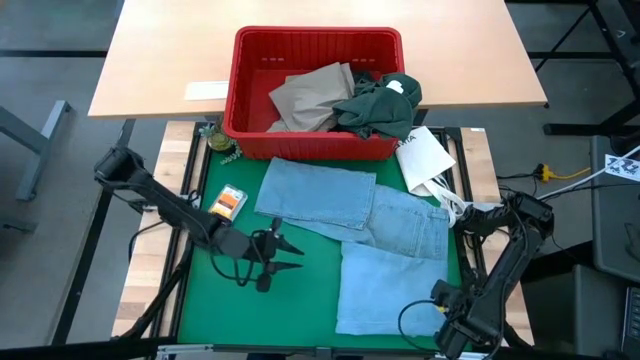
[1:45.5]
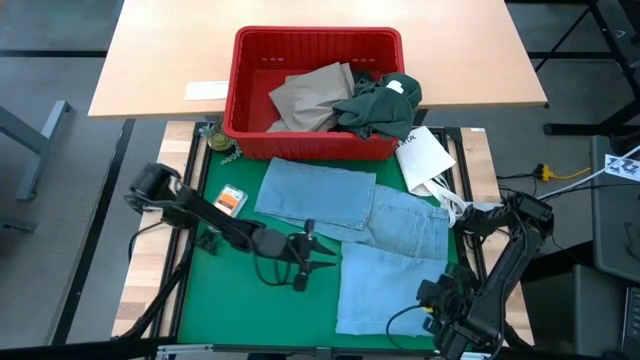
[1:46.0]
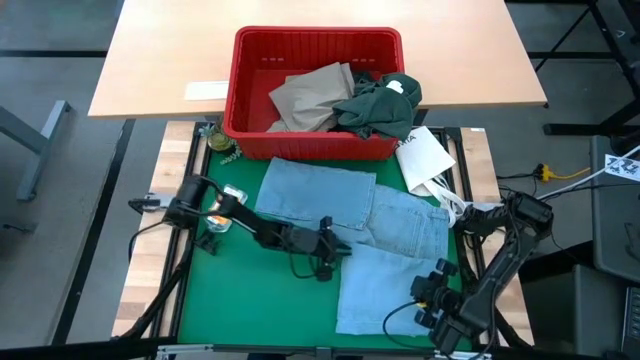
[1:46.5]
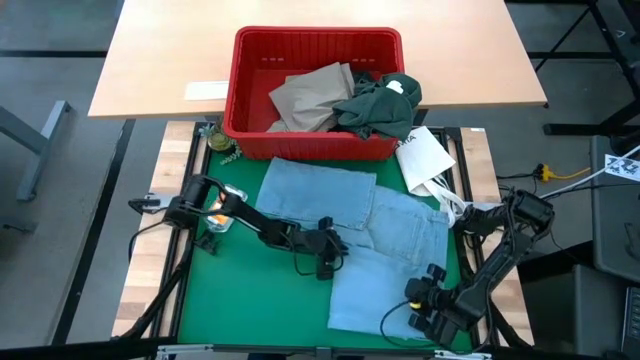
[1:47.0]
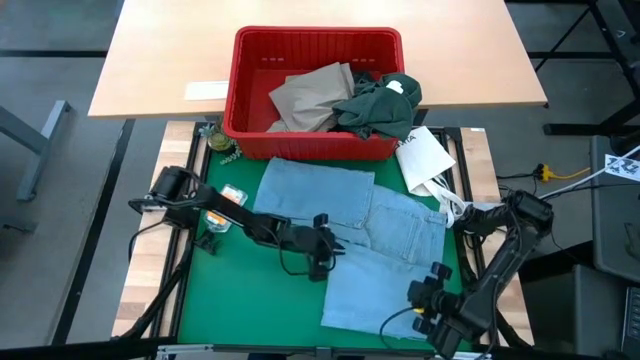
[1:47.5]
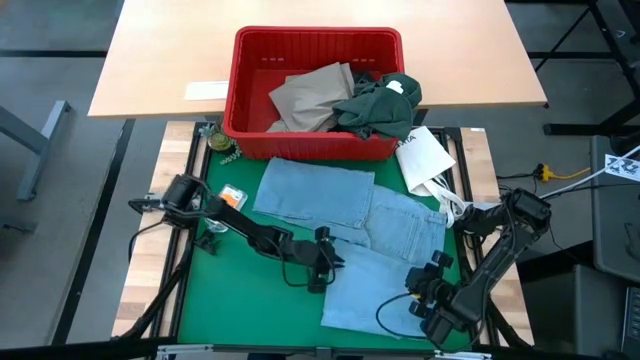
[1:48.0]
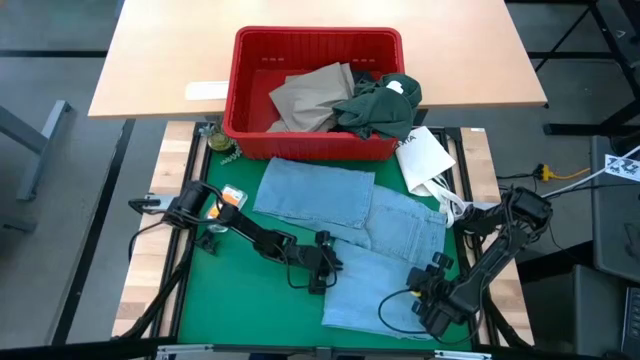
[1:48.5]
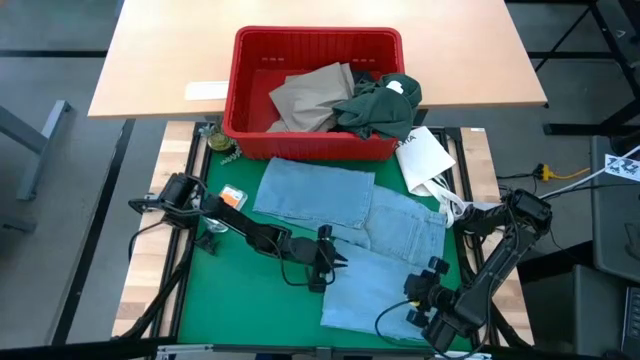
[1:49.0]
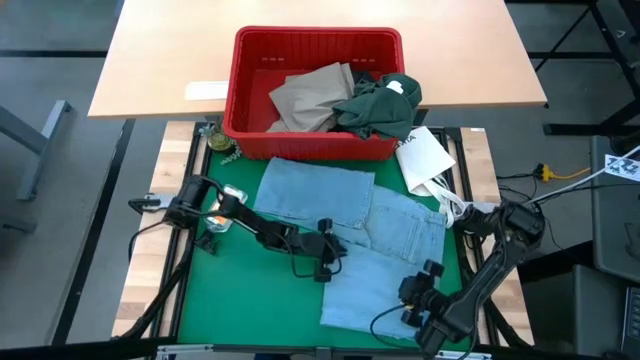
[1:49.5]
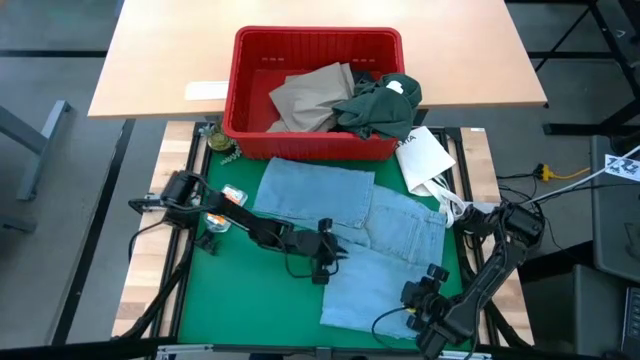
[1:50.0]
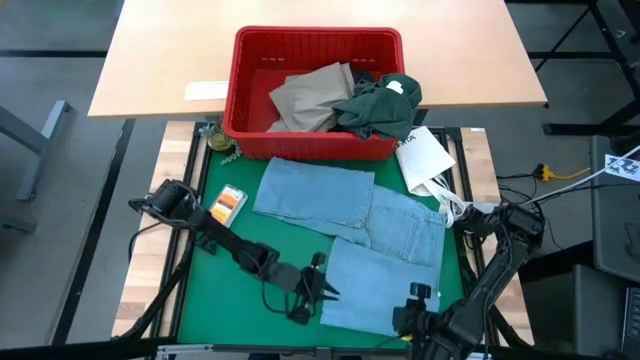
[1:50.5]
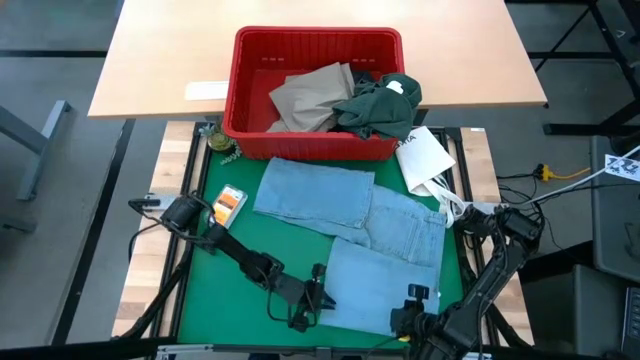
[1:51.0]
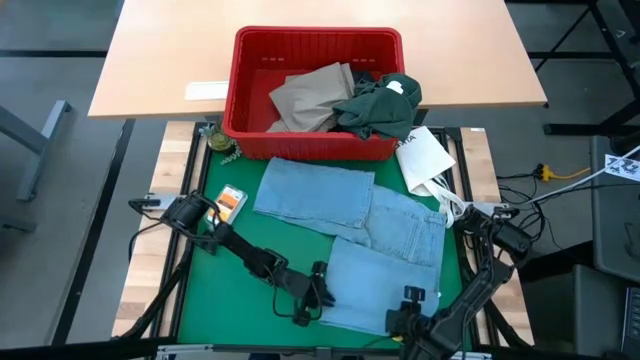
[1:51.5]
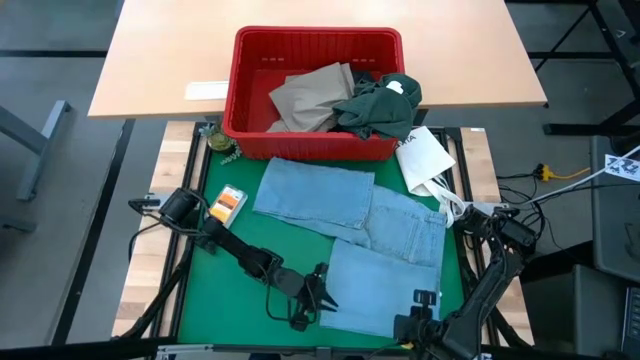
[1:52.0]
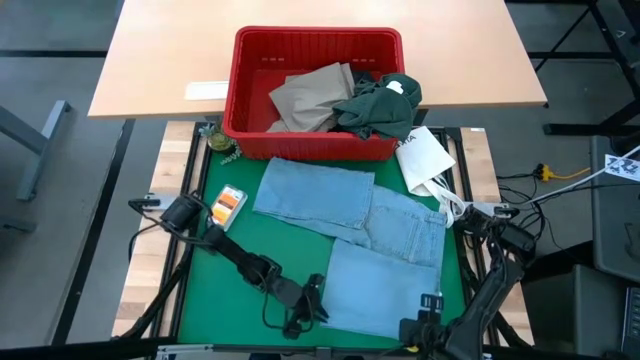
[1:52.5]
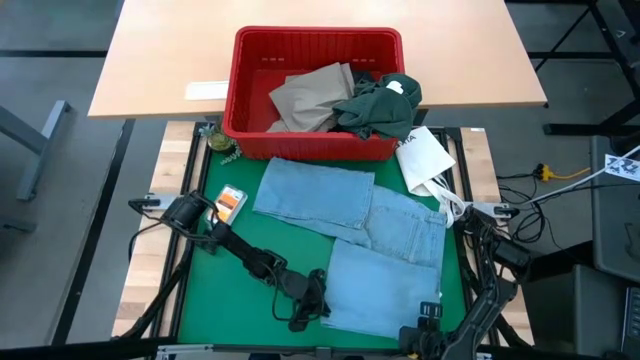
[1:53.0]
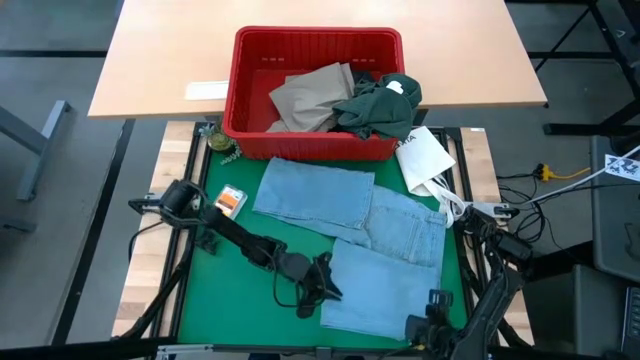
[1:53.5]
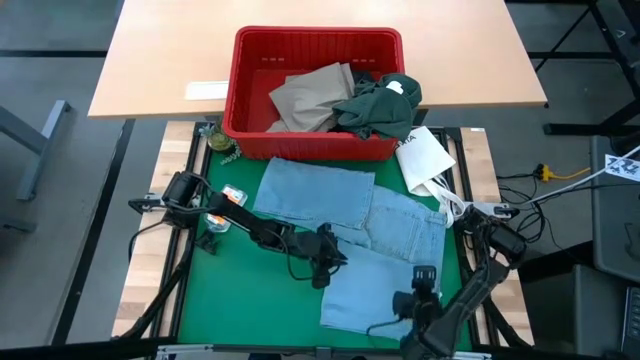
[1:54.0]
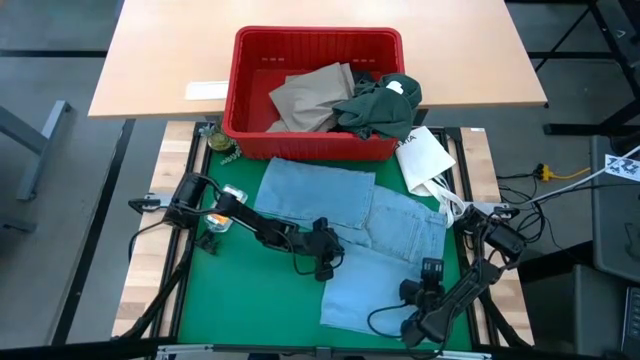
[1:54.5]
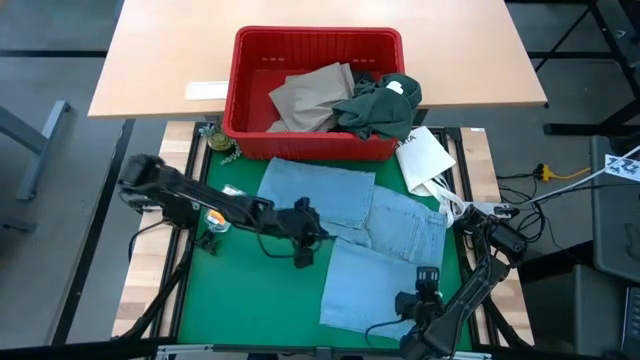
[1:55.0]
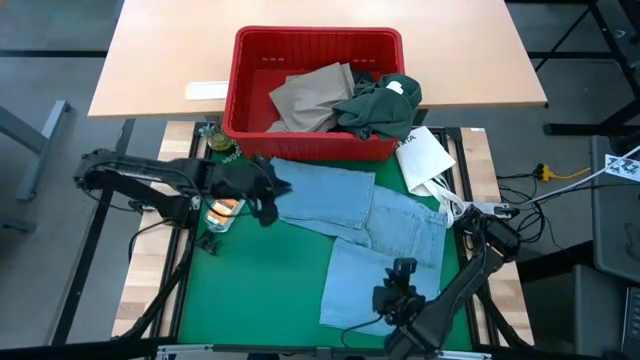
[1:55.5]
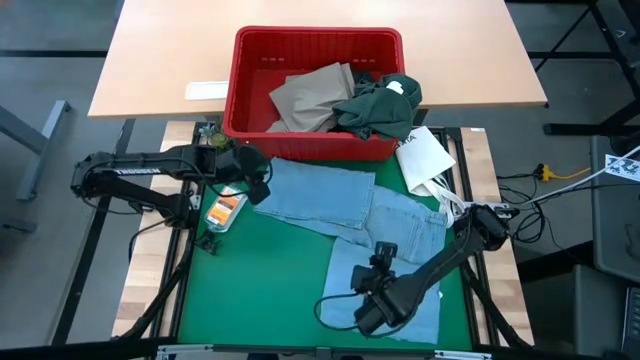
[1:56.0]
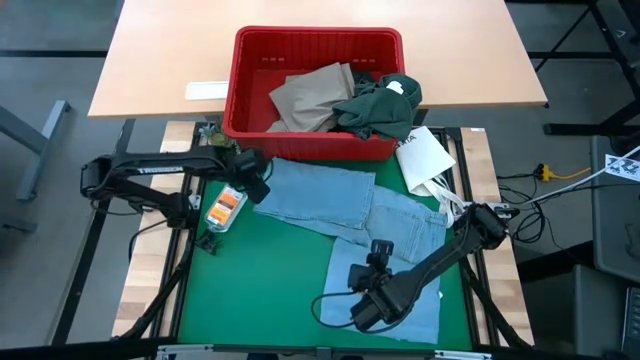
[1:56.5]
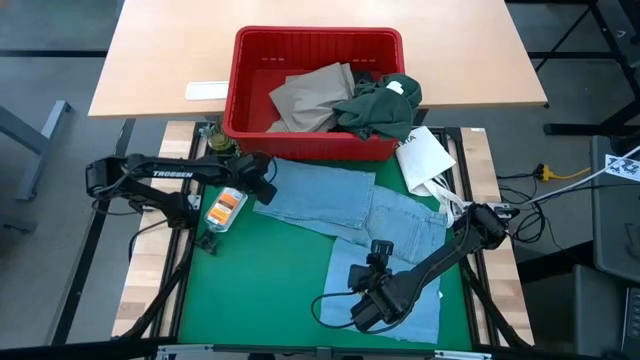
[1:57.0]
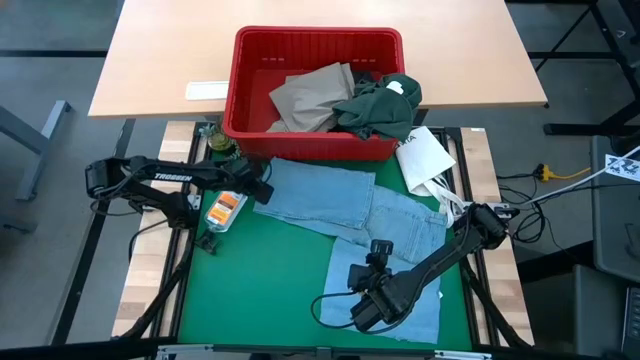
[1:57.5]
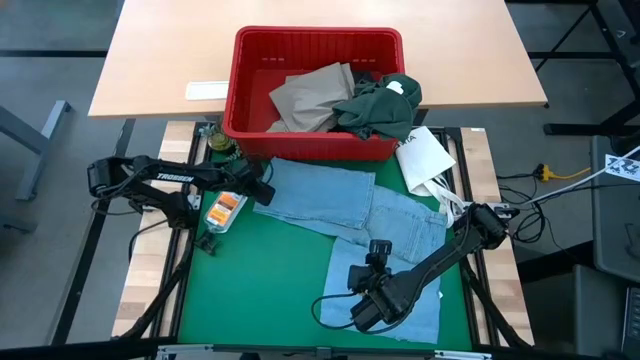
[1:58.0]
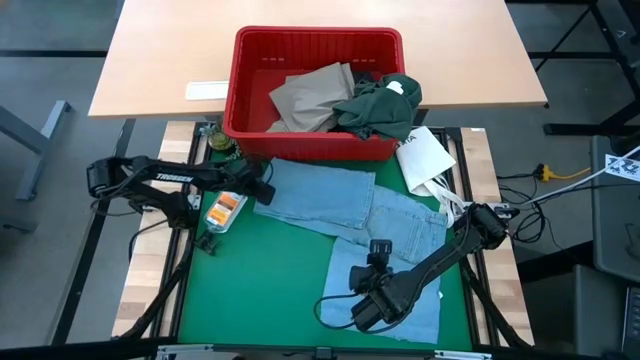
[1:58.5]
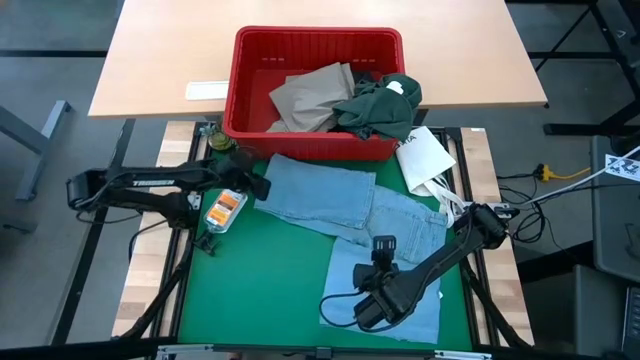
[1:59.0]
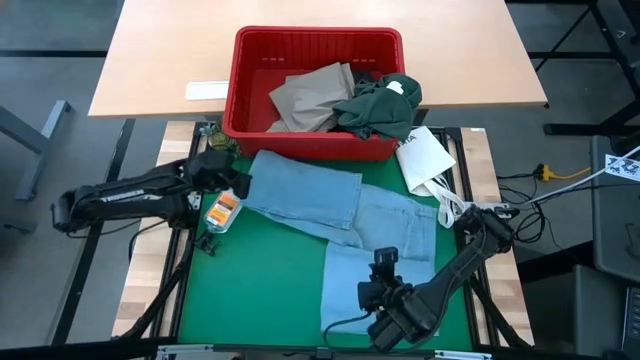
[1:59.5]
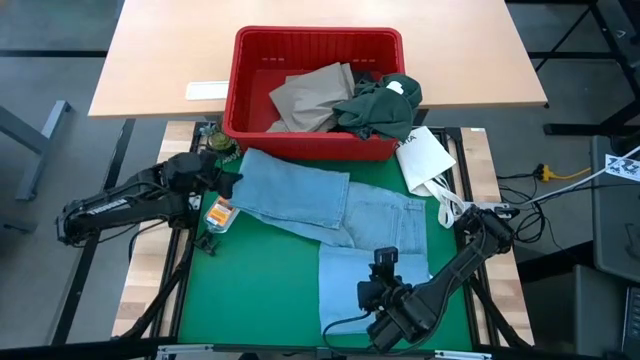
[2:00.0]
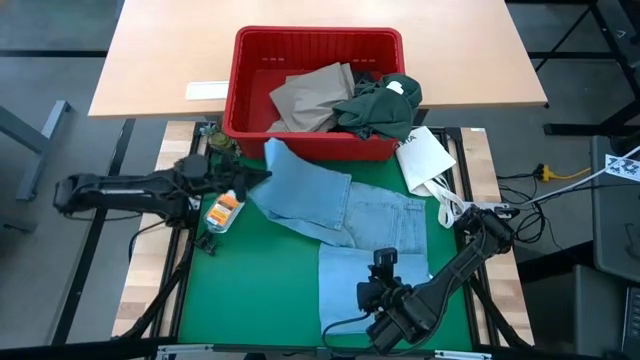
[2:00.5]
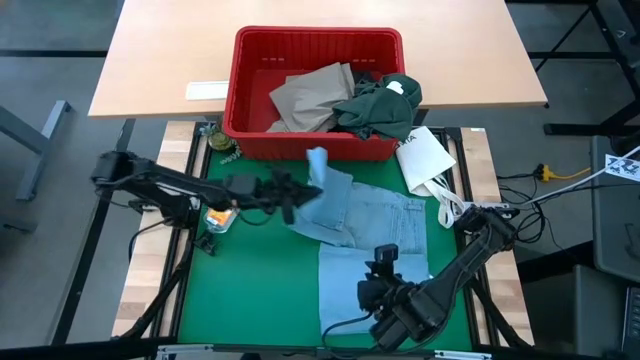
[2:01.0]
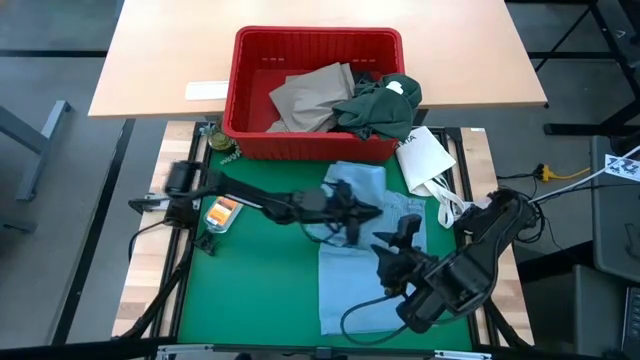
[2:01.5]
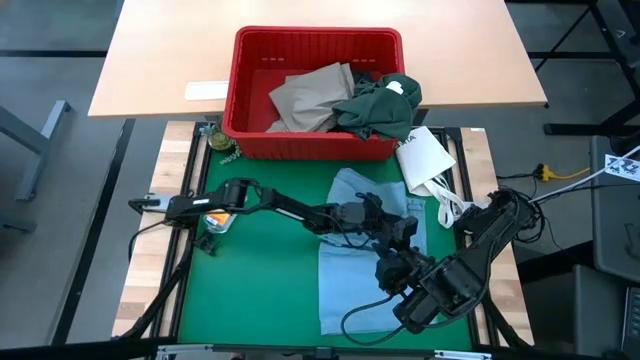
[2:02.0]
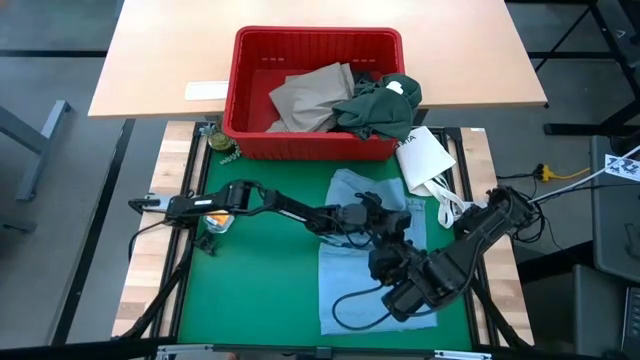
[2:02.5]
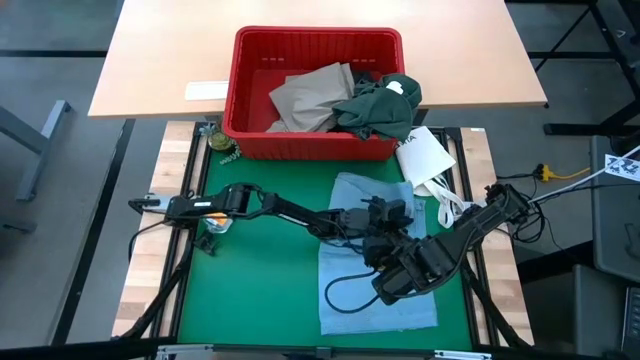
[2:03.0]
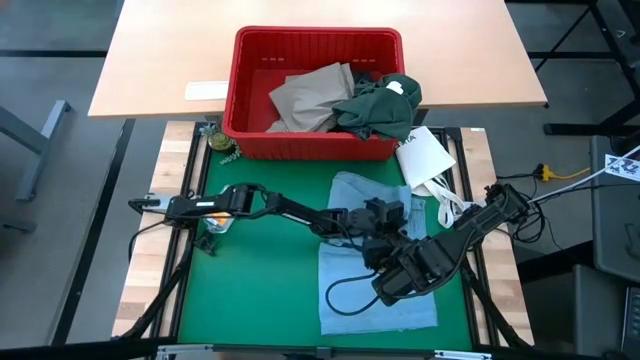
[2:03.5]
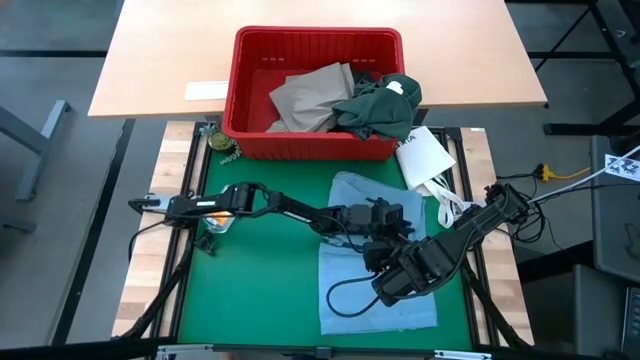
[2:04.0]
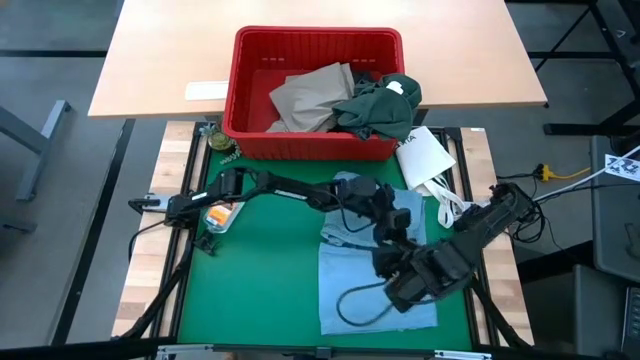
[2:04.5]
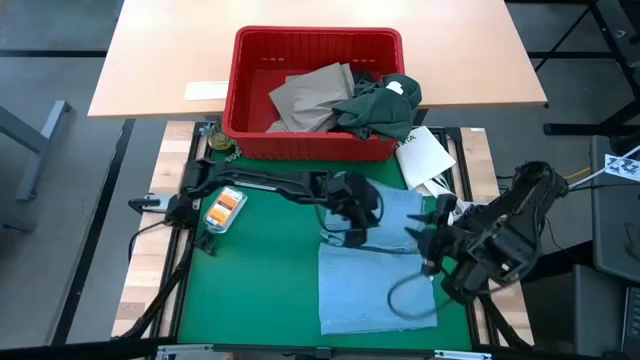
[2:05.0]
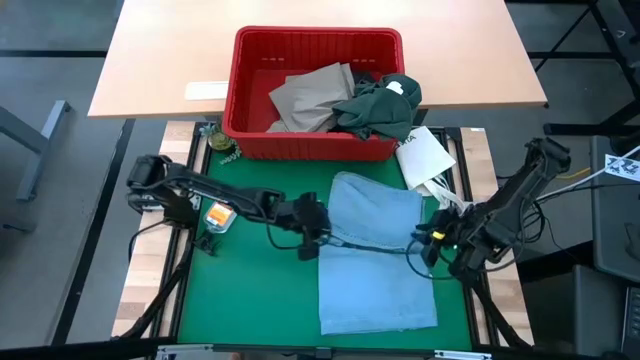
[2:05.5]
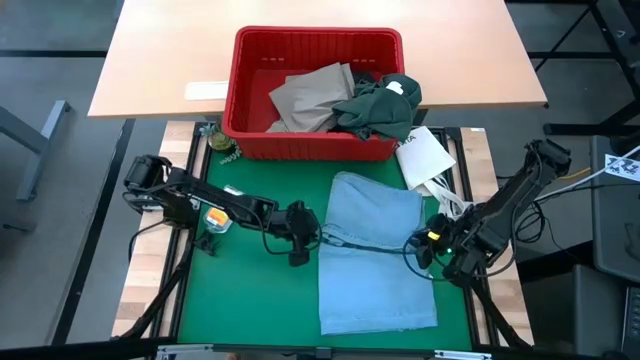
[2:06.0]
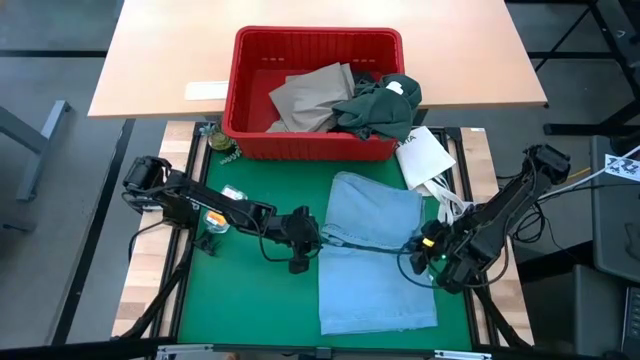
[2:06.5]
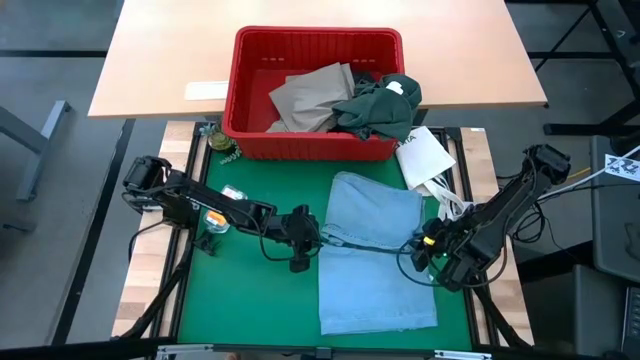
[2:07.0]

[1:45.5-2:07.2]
Task: Fold Laundry from Bin
Fold the blue pants
